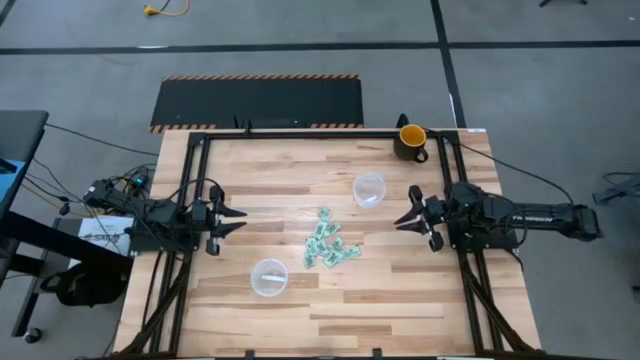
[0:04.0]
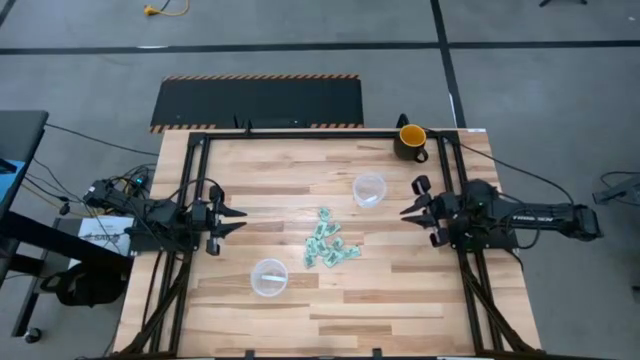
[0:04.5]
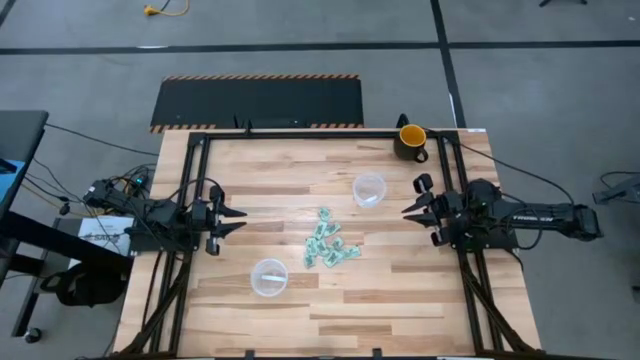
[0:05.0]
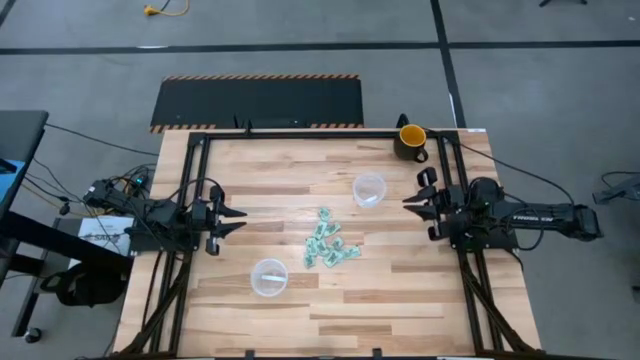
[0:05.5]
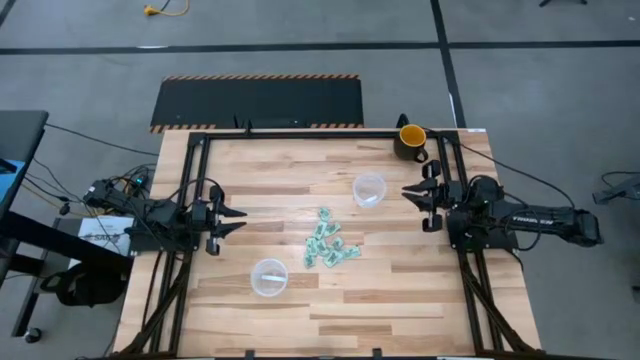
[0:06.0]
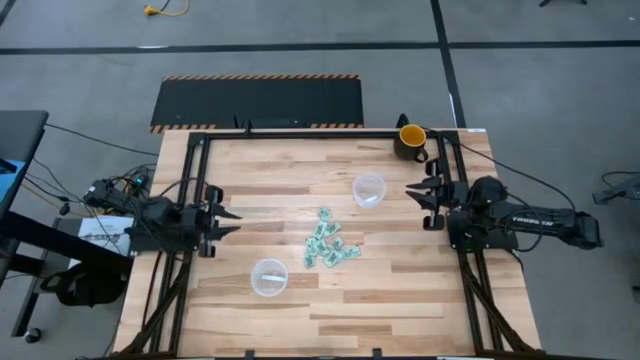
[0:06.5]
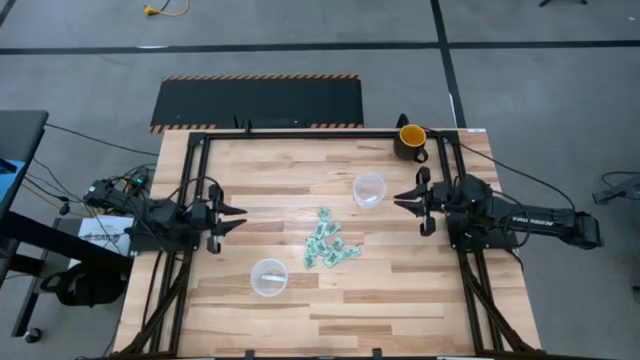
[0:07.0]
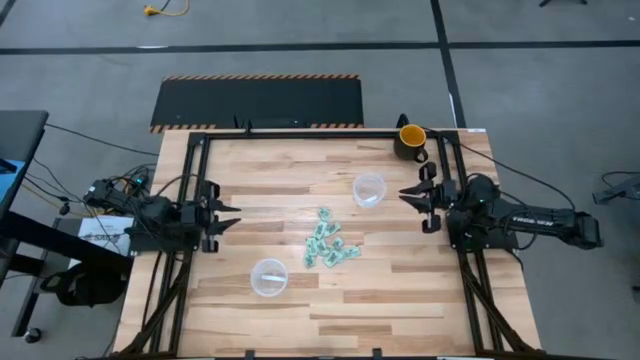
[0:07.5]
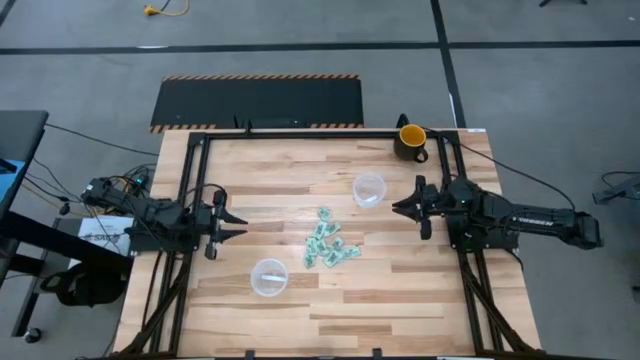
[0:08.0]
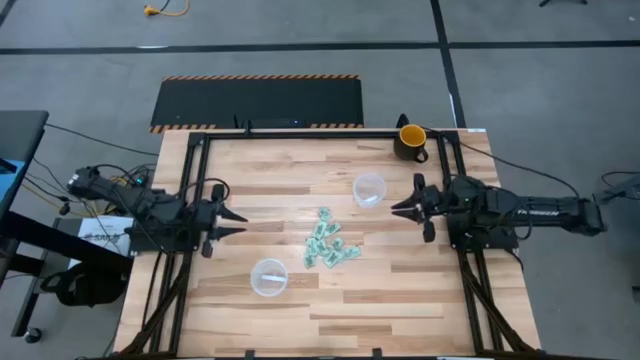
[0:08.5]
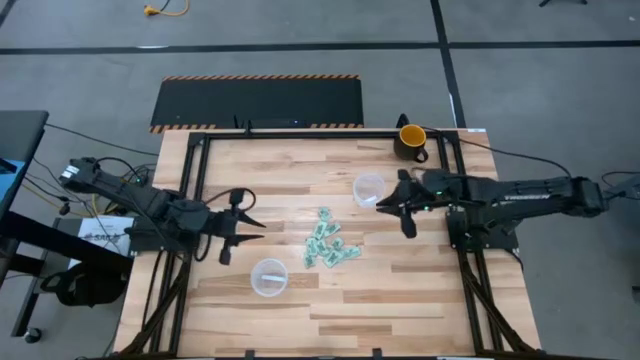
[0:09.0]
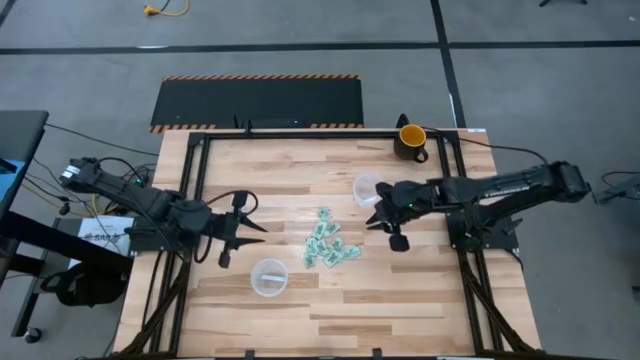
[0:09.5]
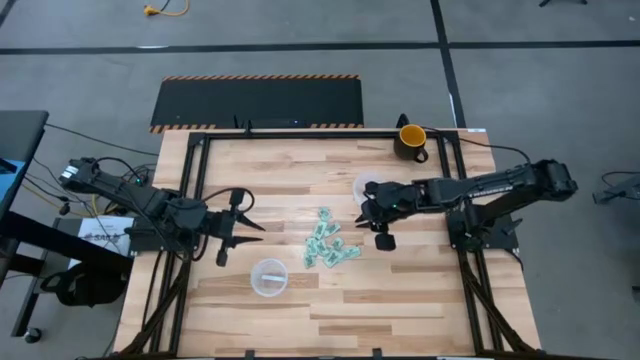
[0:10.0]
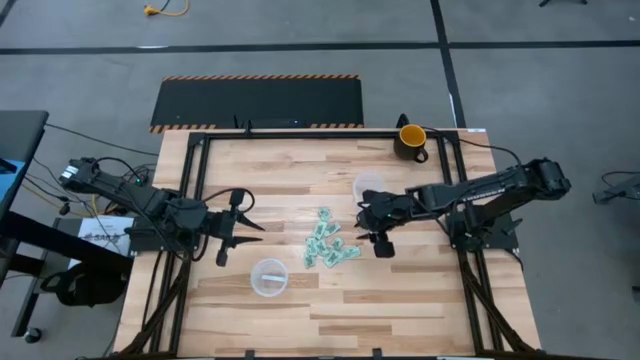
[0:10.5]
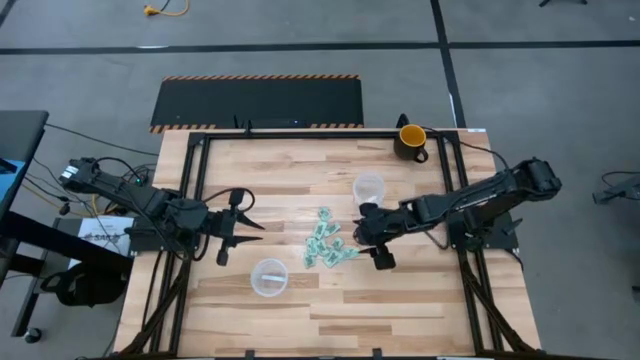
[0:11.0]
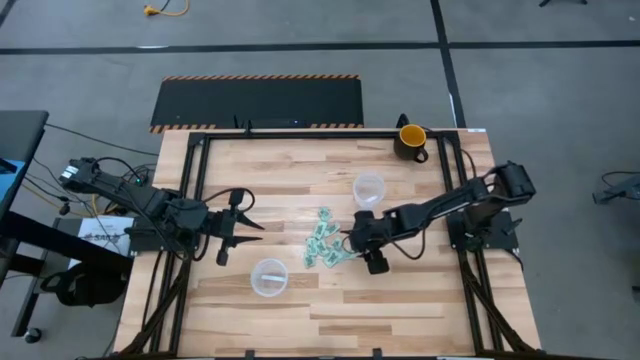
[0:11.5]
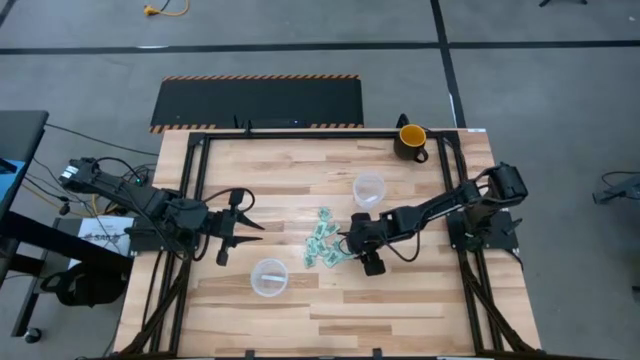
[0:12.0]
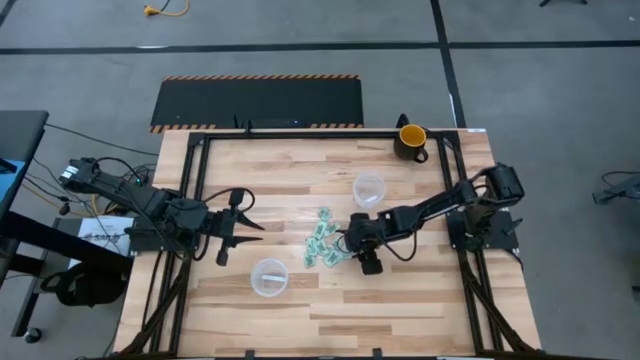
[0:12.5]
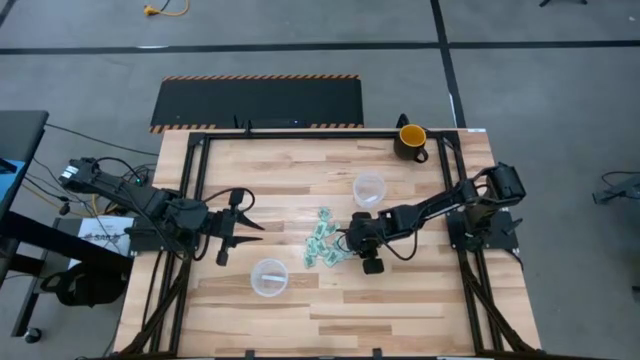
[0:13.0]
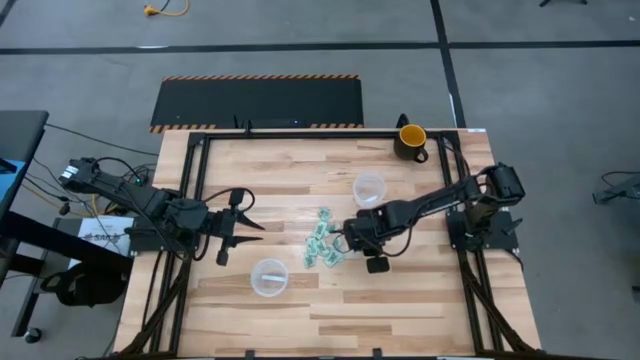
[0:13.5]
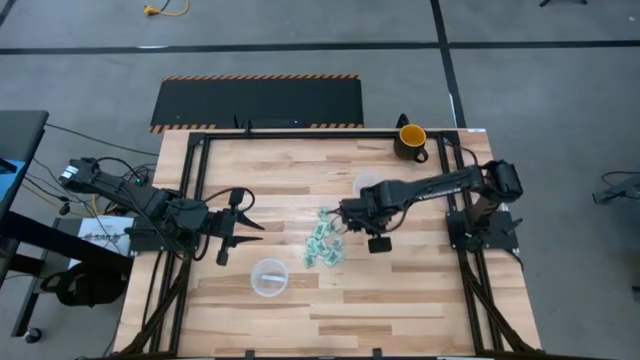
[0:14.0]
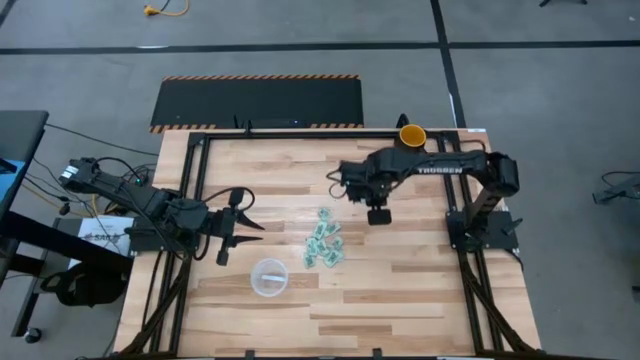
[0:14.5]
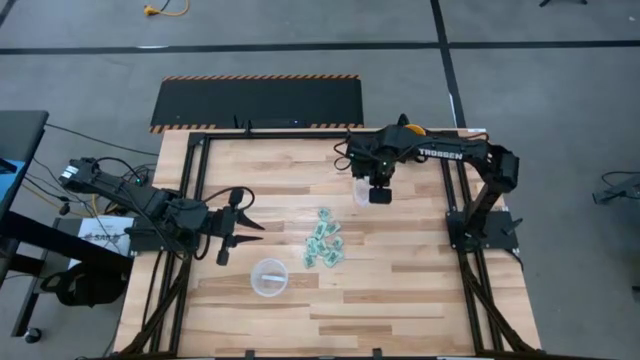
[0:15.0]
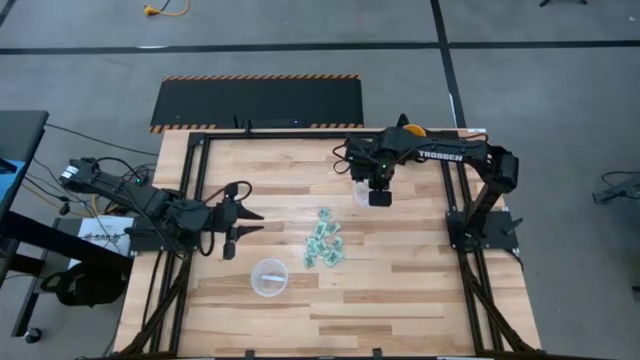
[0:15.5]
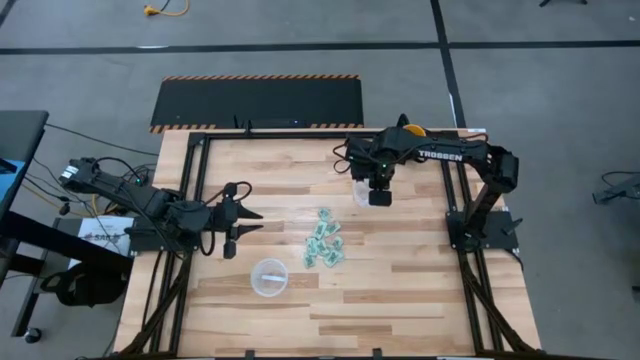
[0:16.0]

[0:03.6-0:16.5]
Task: Pick and place Stevia / Truvia into bins
Put the stevia packet into the top transparent container

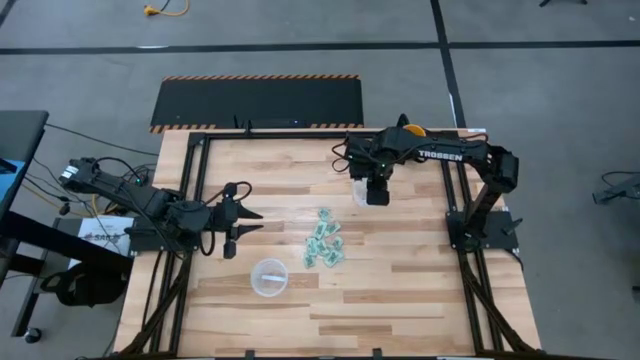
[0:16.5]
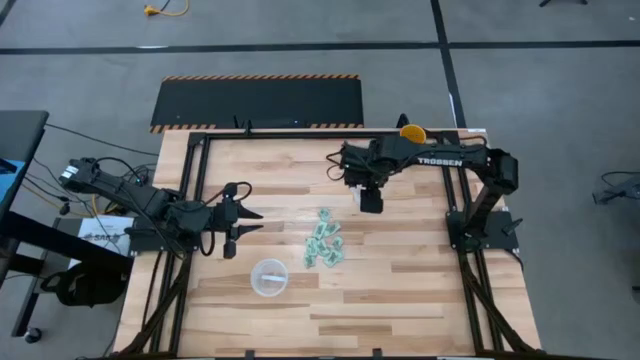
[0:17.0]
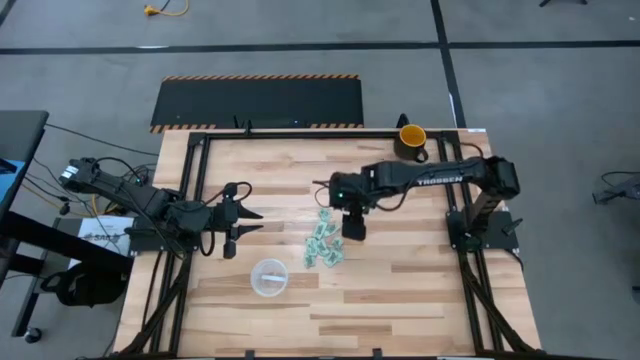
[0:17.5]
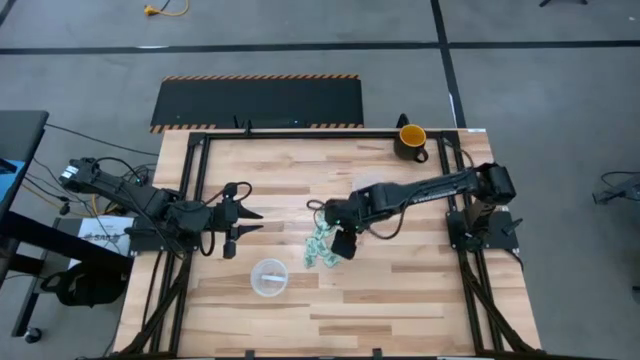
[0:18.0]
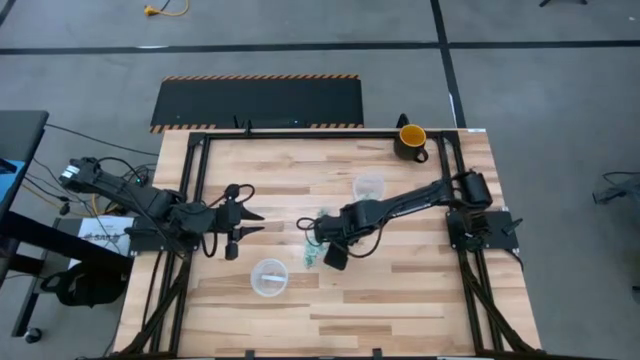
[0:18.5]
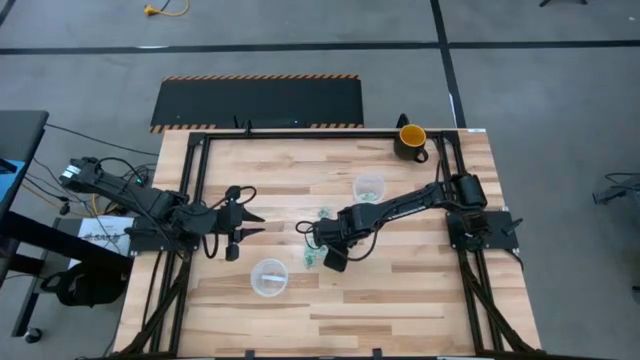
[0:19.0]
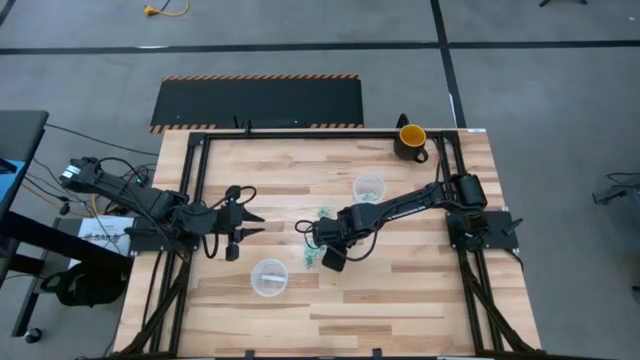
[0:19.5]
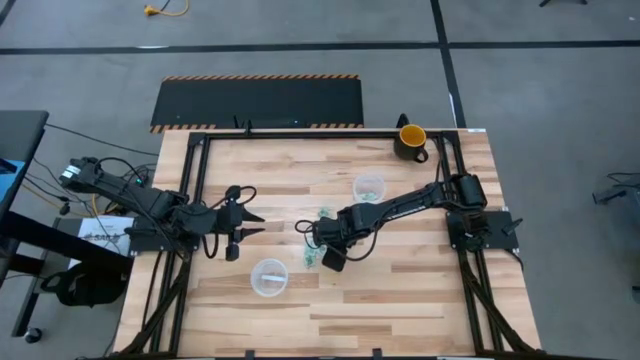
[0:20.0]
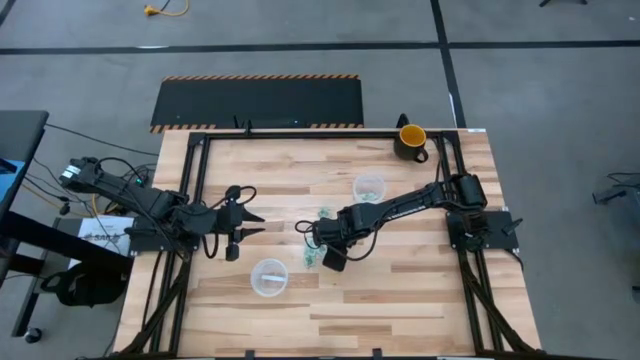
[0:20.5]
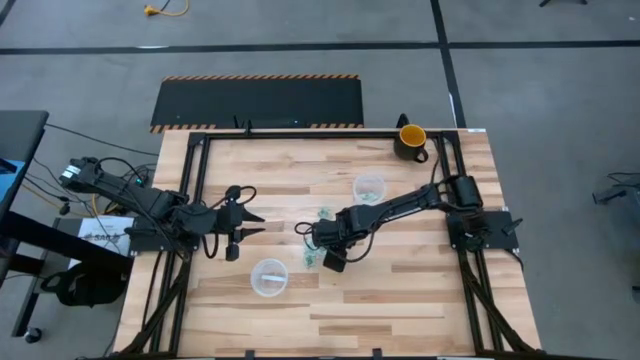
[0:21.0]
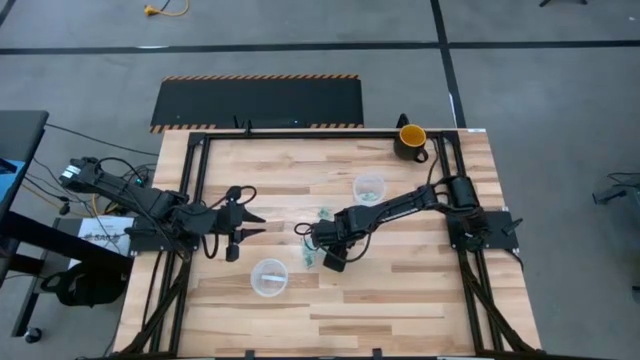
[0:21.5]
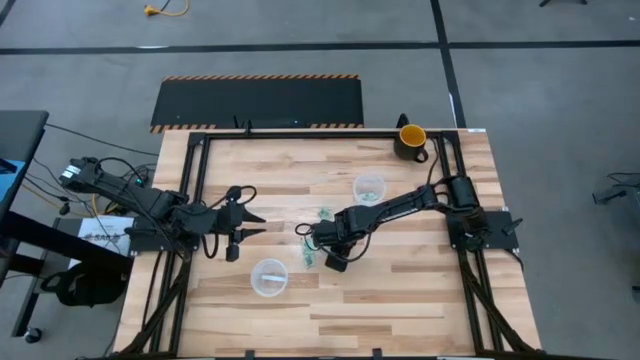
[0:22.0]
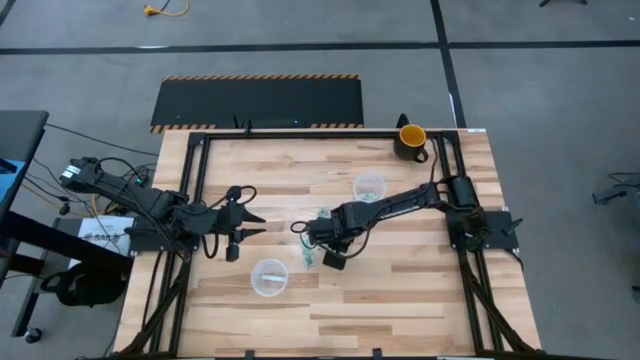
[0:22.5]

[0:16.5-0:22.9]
Put the stevia packet into the top transparent container

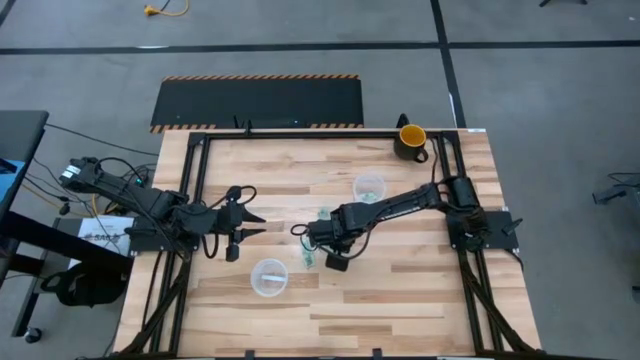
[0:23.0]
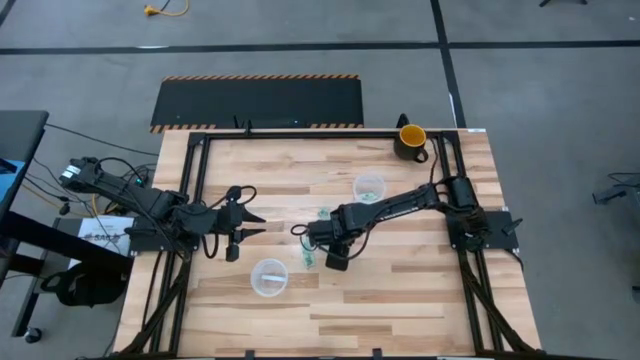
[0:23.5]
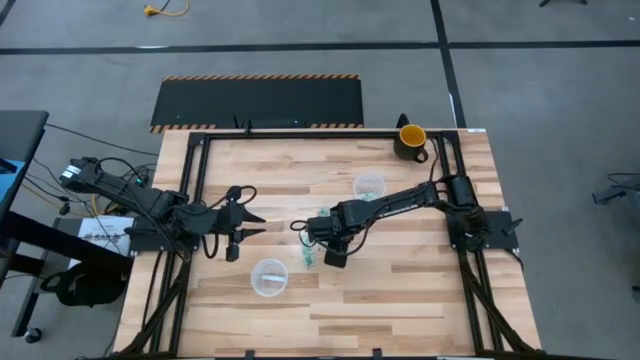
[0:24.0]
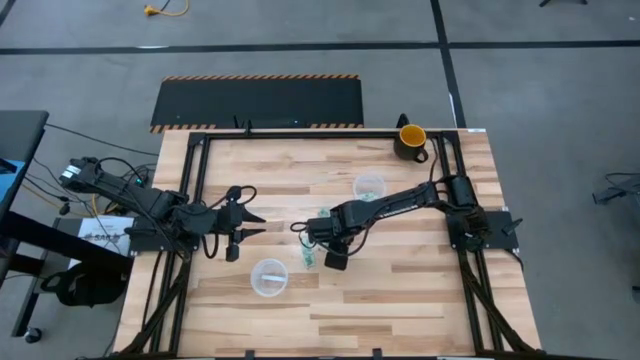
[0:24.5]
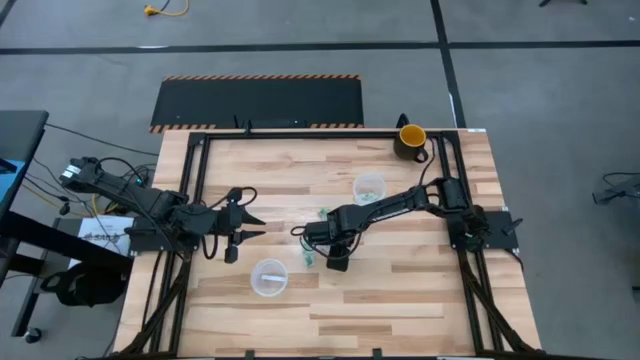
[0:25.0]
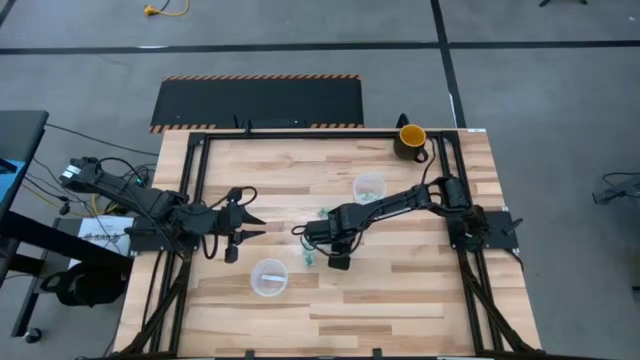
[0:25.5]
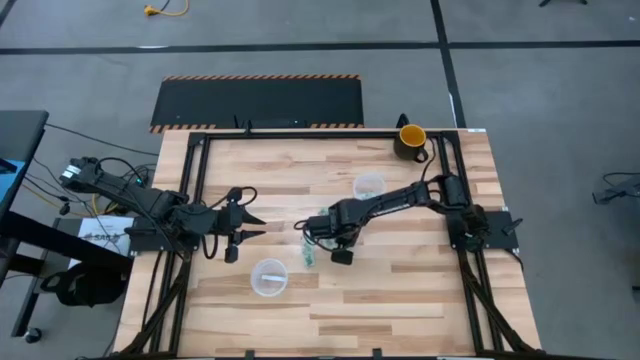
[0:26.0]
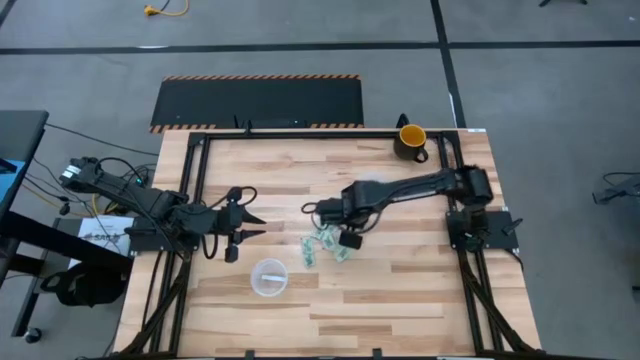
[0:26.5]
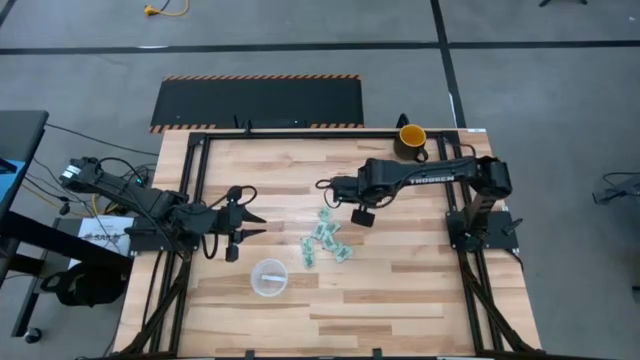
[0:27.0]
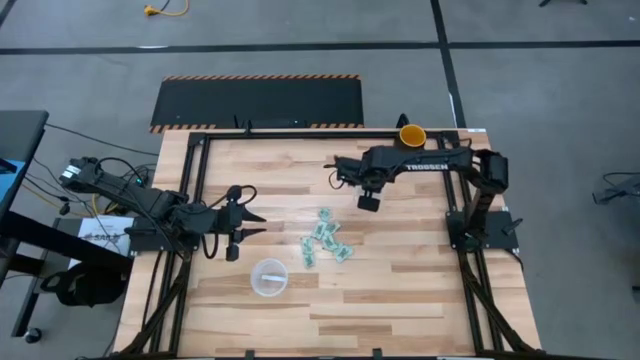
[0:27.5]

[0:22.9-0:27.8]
Put the stevia packet into the top transparent container
